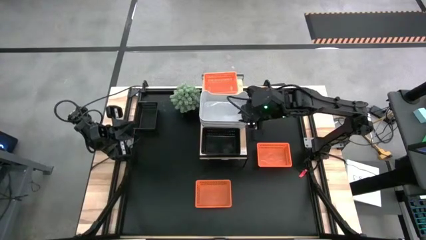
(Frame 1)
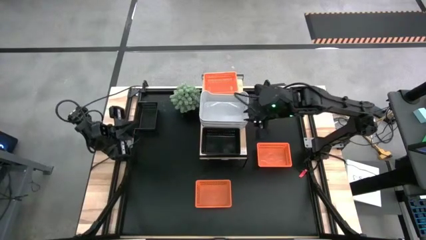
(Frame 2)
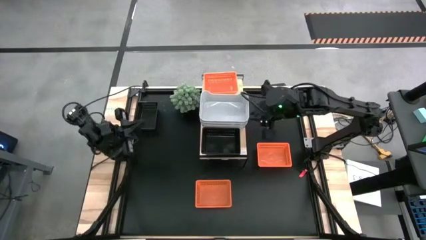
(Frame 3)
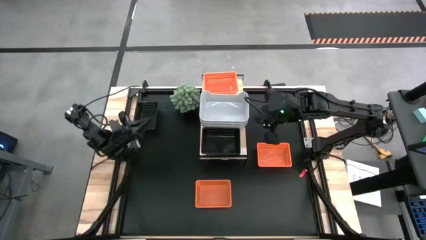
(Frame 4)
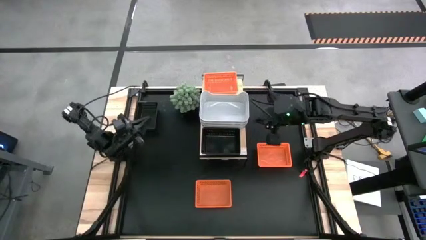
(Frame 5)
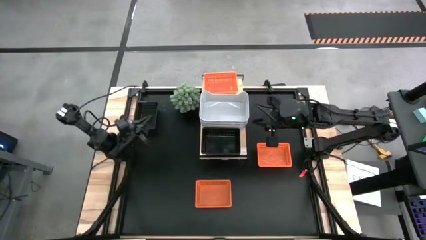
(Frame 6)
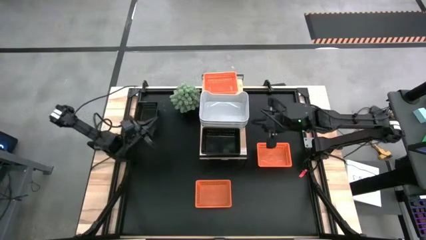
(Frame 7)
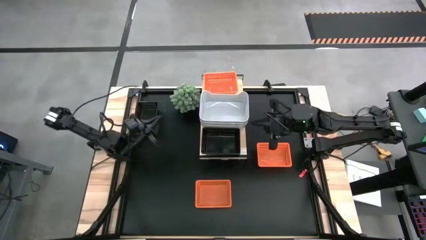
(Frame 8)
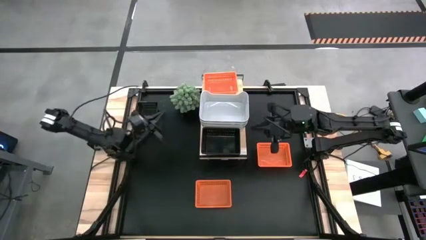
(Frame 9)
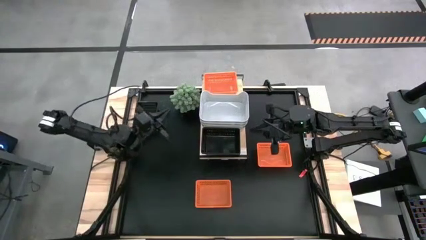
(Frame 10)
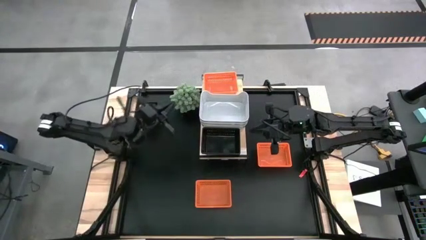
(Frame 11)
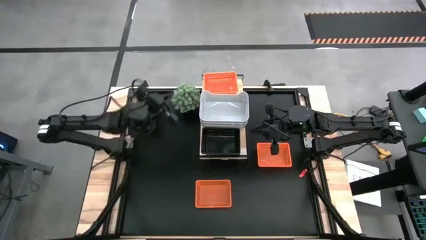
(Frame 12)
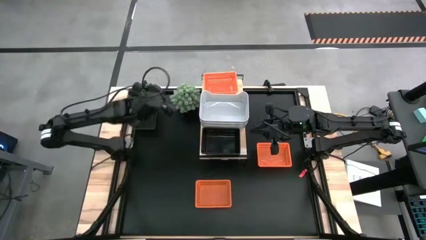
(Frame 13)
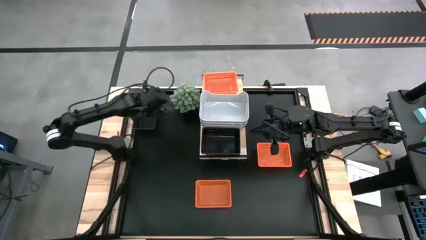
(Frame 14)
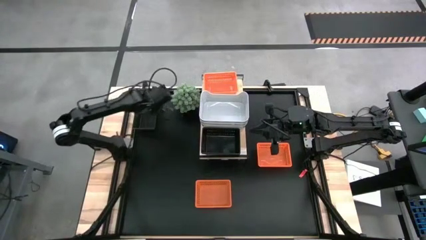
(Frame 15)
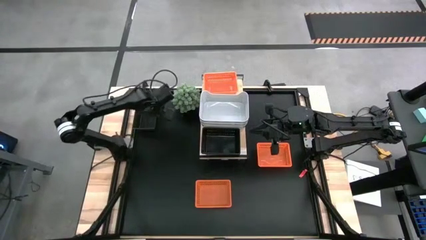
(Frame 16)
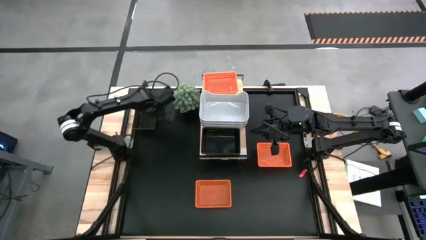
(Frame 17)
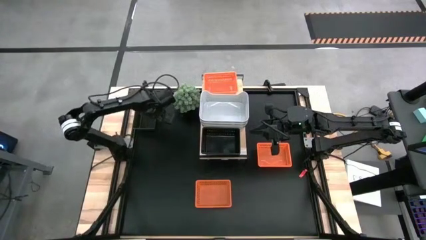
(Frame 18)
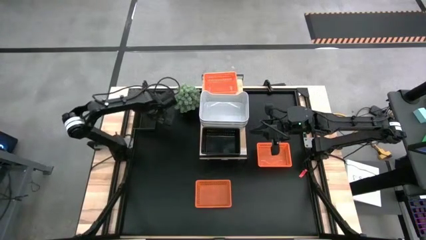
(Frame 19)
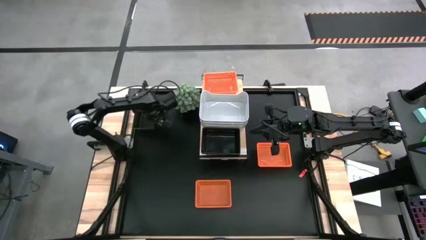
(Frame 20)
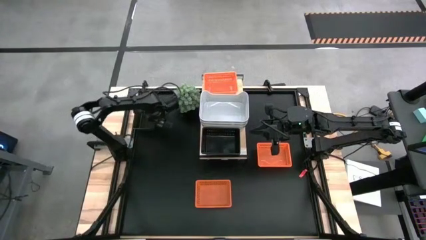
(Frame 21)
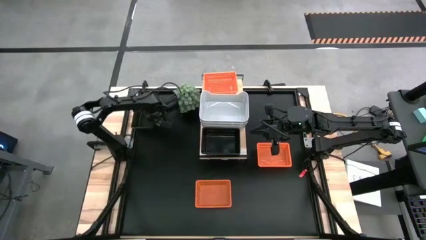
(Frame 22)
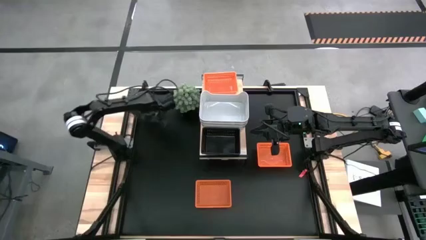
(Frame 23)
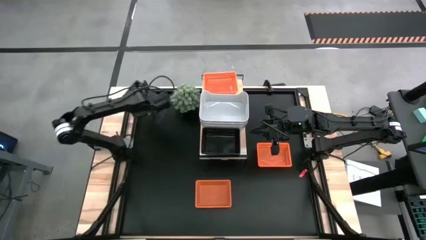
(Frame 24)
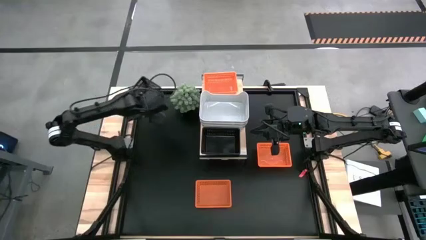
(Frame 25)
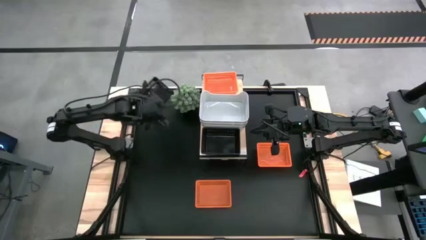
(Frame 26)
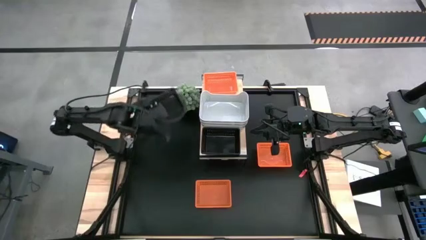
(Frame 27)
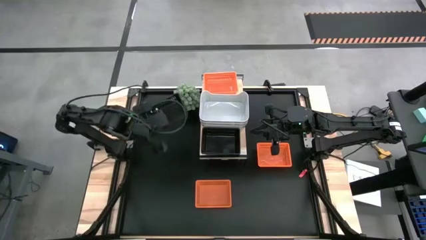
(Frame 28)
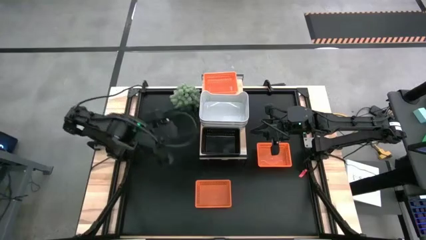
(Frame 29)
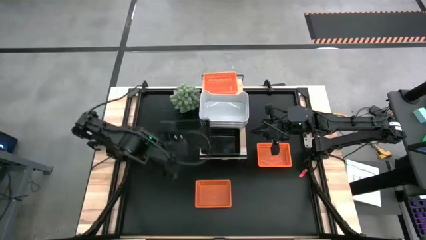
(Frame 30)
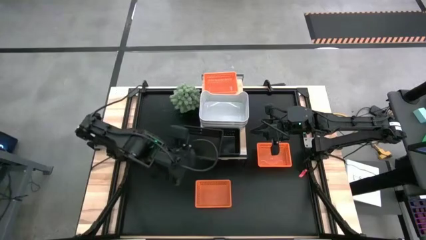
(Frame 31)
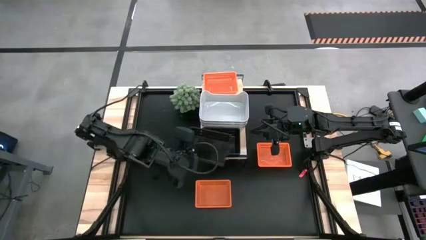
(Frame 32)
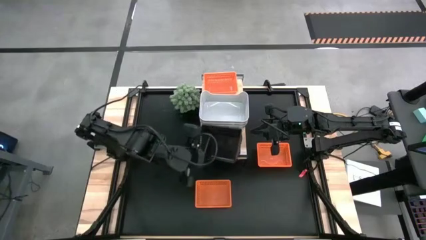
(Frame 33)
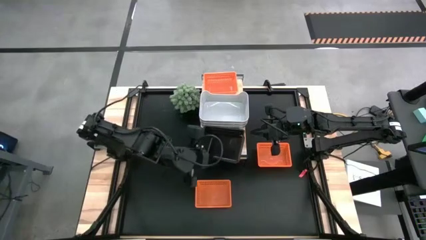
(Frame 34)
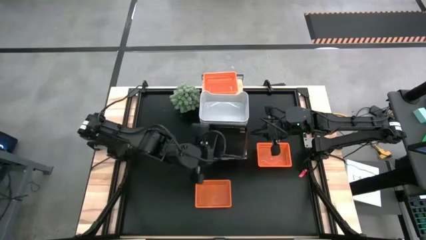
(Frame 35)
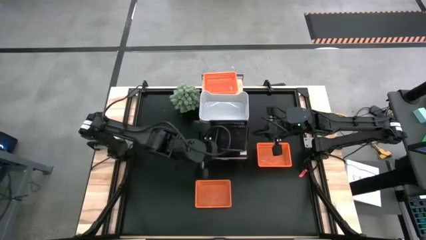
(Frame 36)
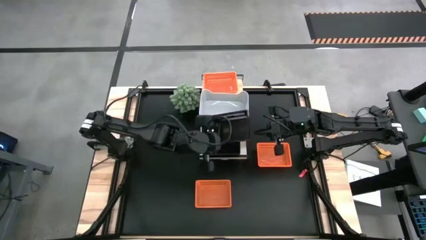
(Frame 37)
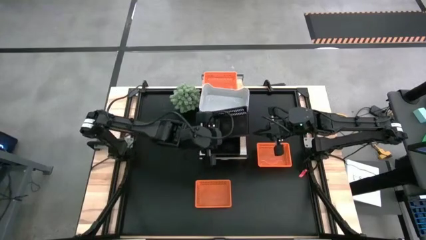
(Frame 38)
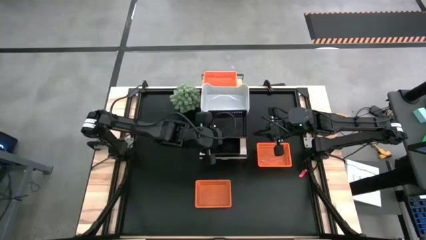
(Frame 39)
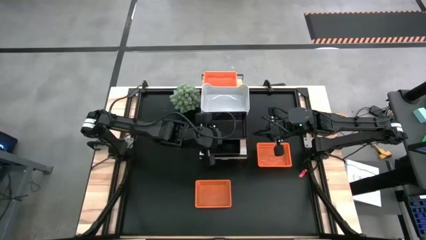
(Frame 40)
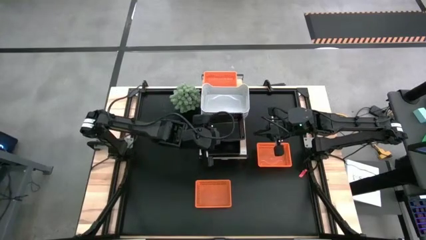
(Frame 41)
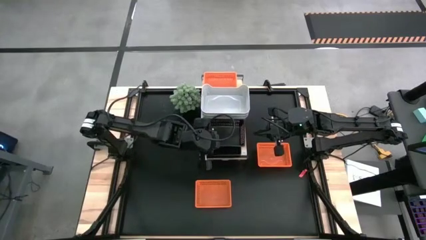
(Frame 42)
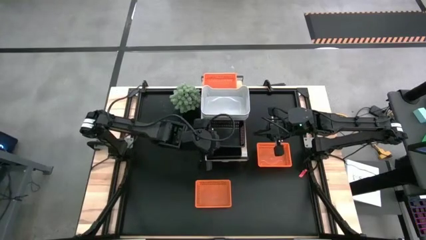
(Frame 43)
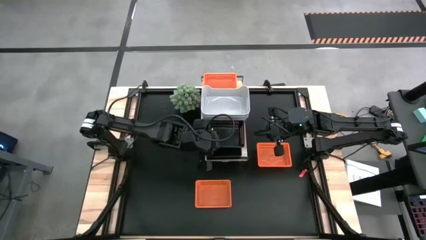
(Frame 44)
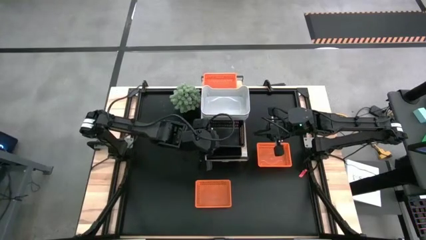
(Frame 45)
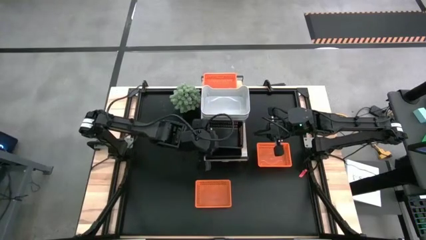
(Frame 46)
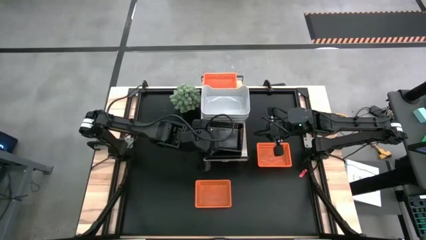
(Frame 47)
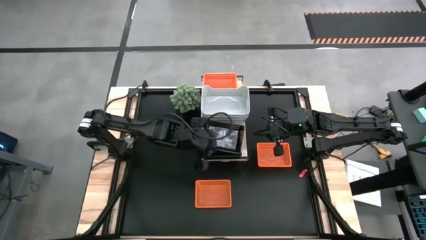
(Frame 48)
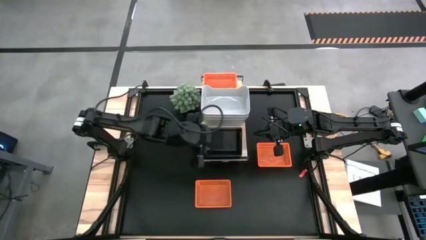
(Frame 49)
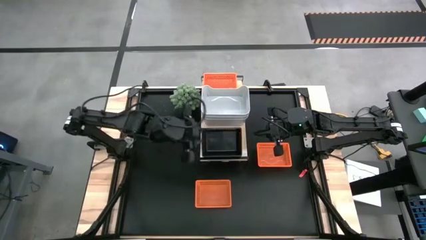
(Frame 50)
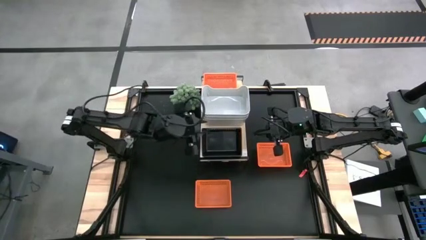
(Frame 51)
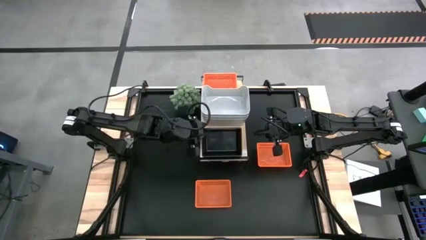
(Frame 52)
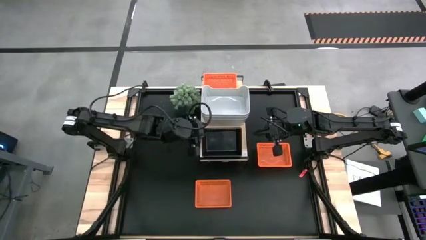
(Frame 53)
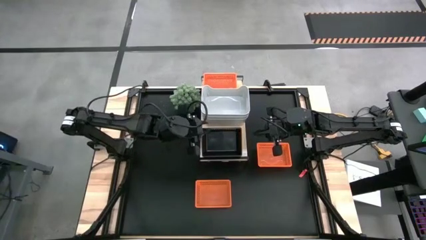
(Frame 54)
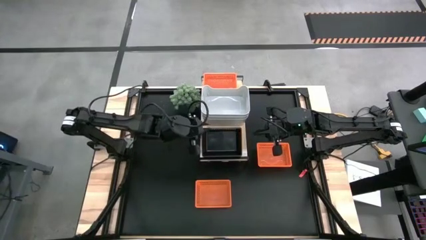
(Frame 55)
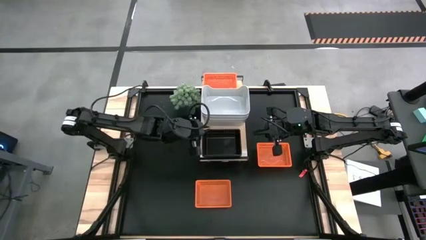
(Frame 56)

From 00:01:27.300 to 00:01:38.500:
Task: Stack baskets on shelf by color
Stack the black bin into the black bins on the shelf

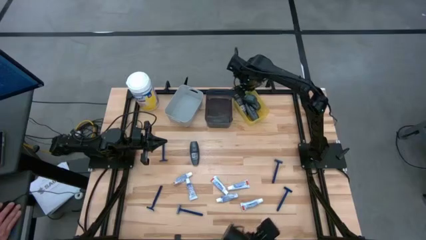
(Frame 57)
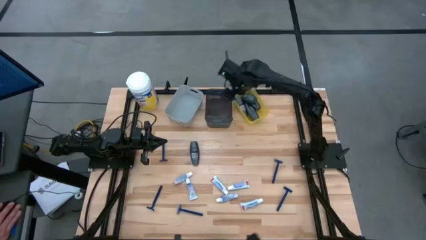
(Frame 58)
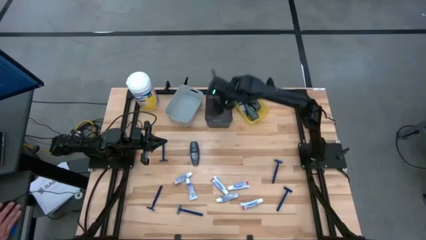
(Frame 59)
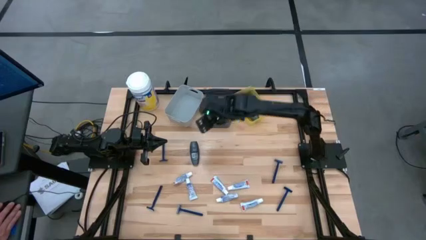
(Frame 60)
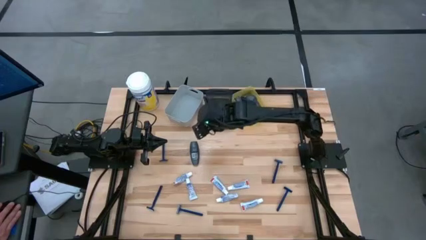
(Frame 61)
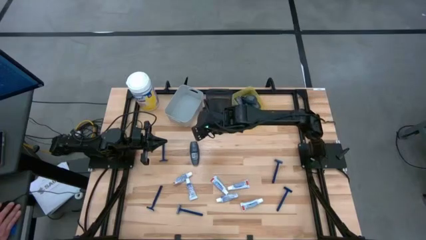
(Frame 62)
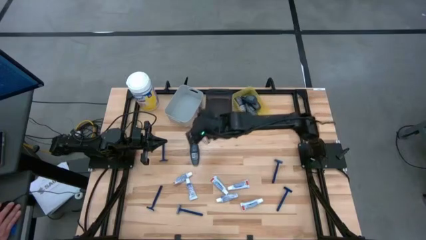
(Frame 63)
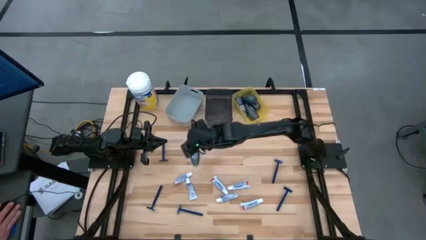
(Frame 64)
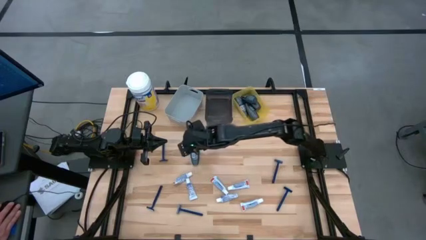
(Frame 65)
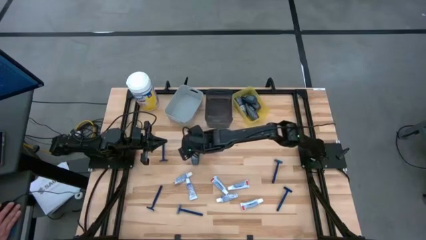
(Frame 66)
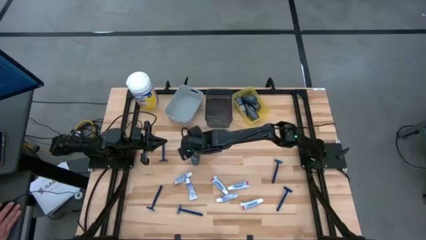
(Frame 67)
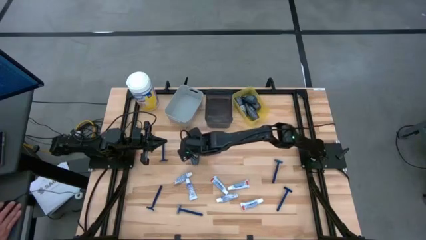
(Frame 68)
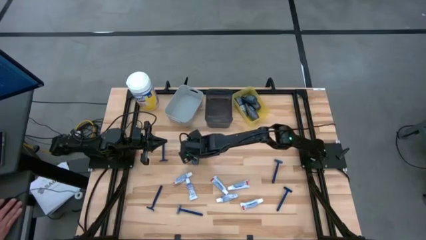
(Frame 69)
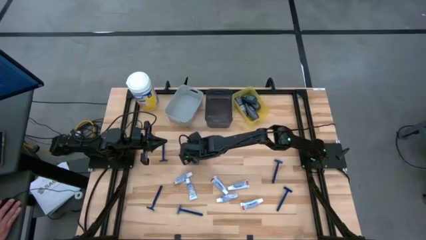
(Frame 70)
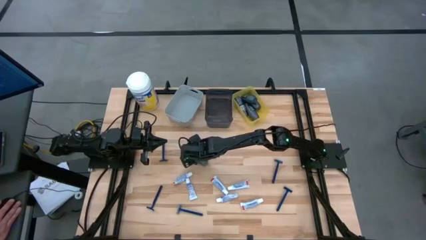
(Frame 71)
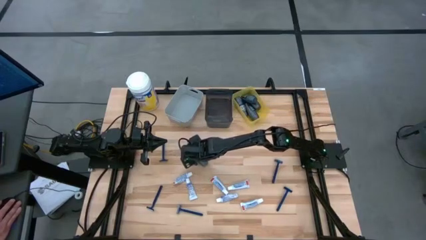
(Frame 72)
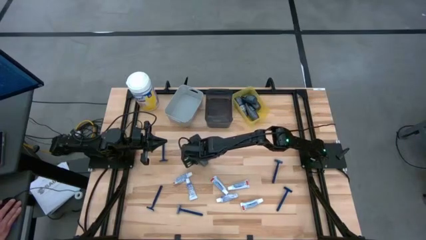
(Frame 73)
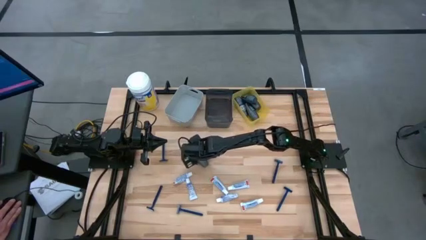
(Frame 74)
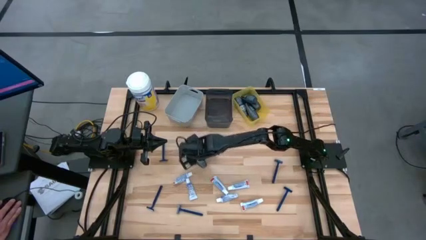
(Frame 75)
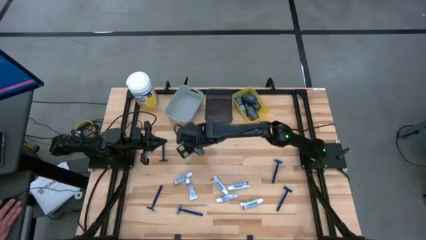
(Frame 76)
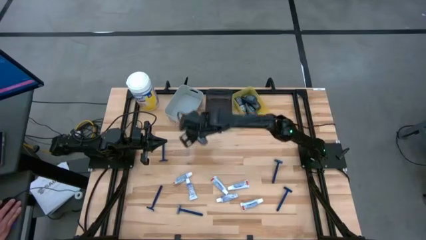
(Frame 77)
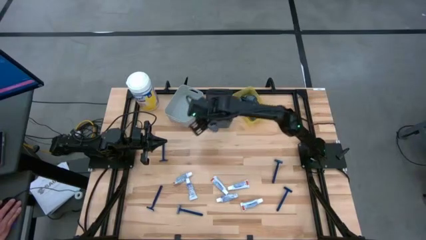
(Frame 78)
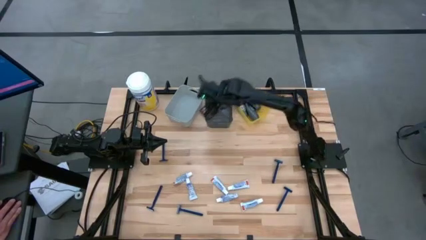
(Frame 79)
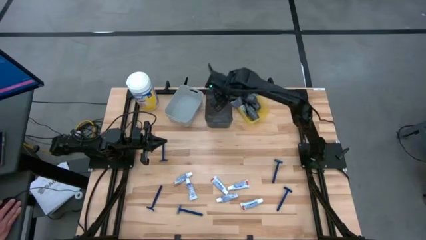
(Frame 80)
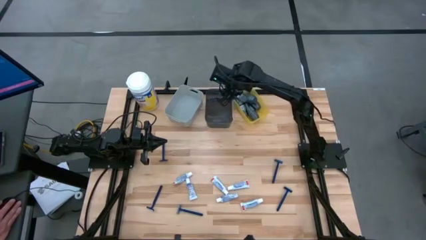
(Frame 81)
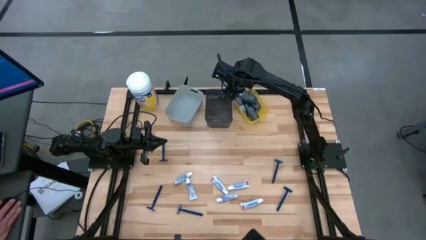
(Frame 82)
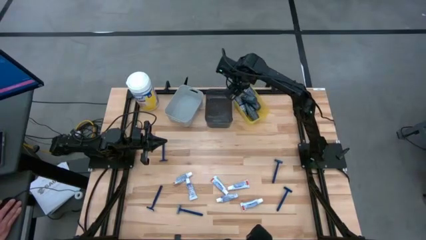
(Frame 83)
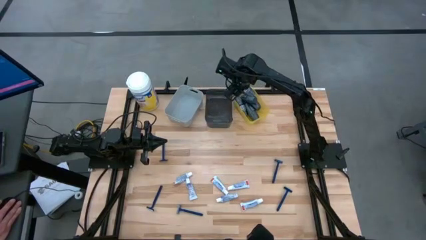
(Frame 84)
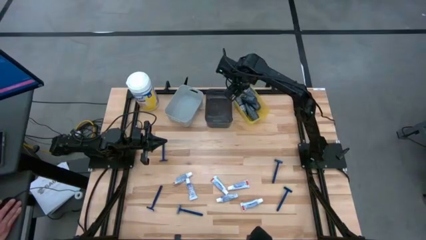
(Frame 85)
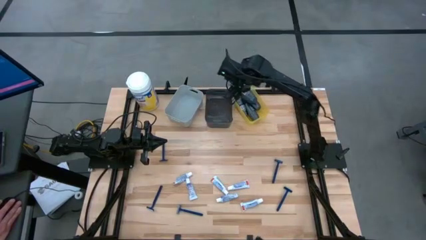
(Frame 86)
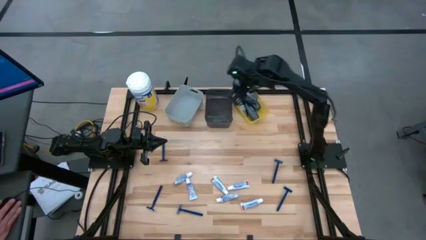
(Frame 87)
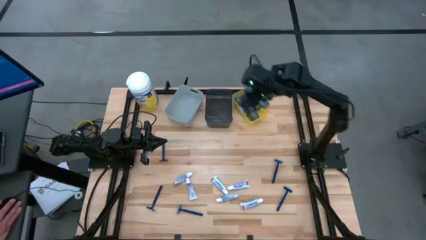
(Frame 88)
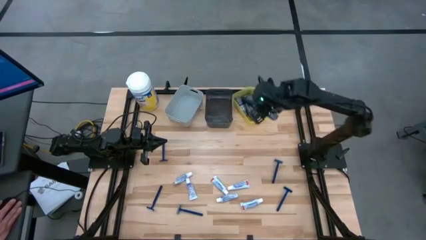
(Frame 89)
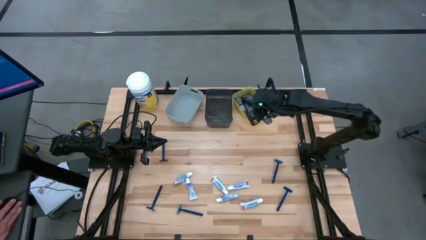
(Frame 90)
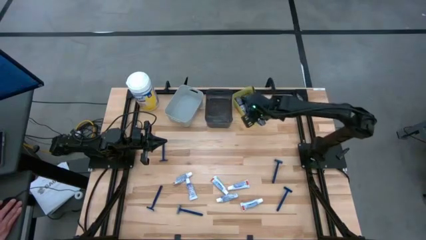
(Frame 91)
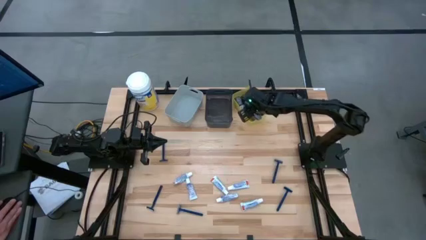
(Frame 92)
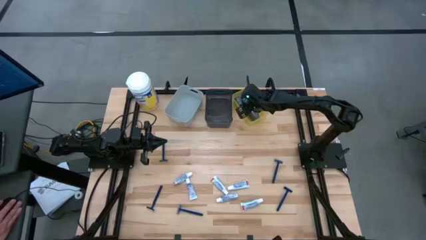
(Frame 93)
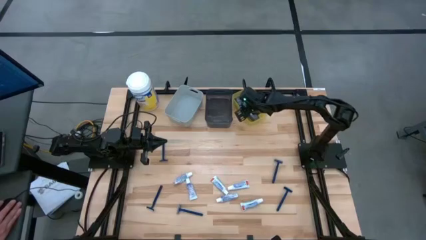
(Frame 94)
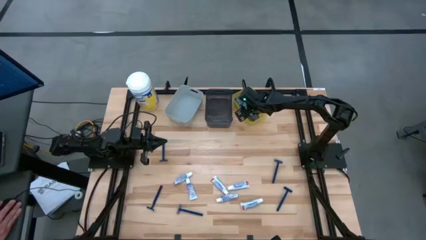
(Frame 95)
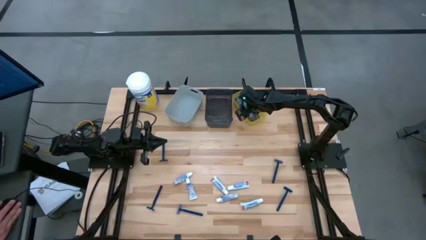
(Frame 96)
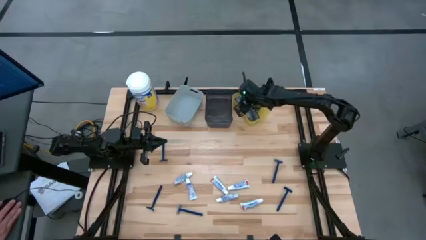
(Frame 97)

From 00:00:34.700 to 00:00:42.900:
Task: Pick & Place Travel size toiletries
Put the deodorant into the yellow bin
